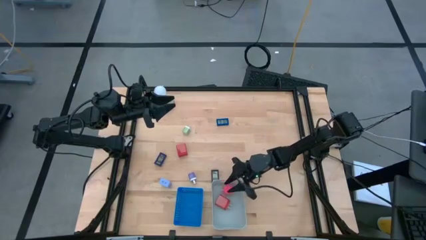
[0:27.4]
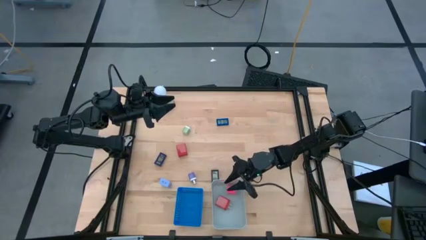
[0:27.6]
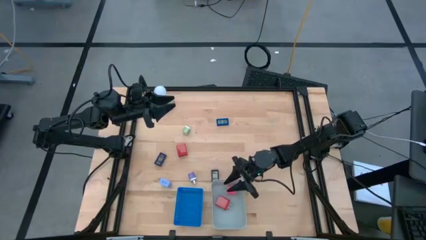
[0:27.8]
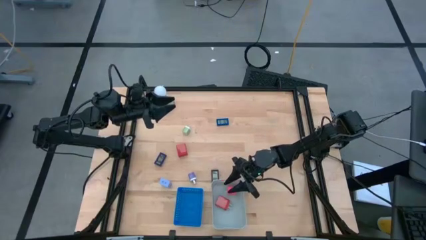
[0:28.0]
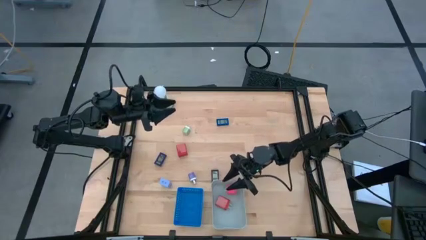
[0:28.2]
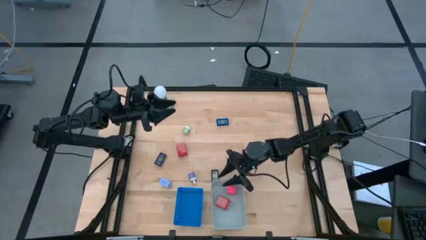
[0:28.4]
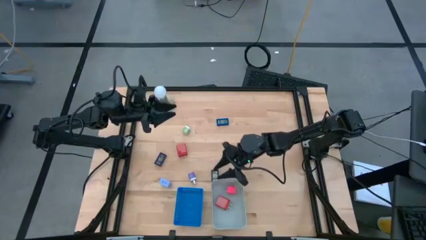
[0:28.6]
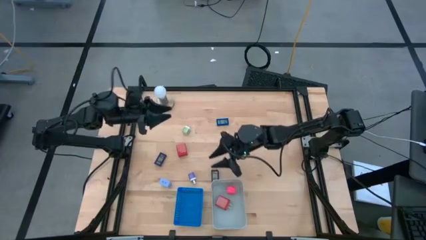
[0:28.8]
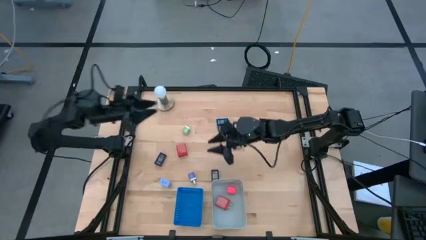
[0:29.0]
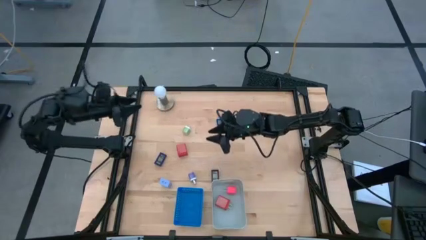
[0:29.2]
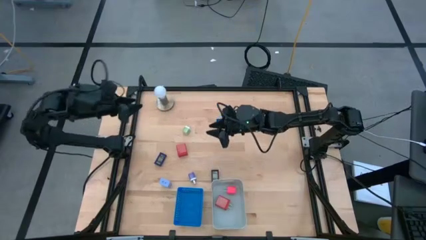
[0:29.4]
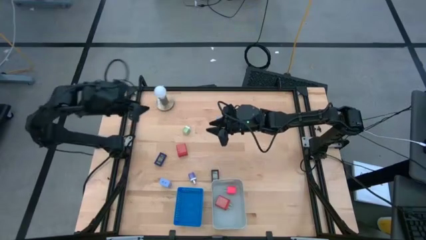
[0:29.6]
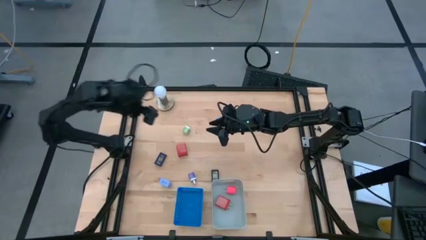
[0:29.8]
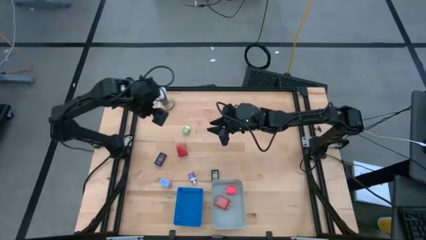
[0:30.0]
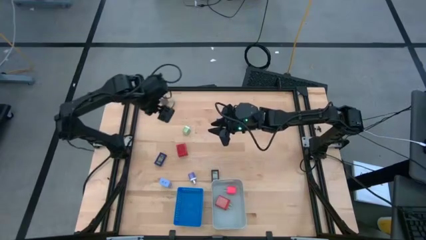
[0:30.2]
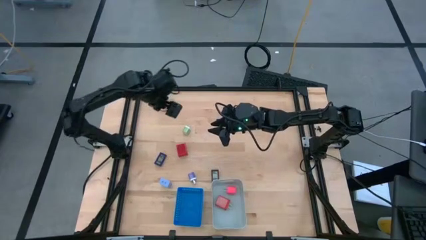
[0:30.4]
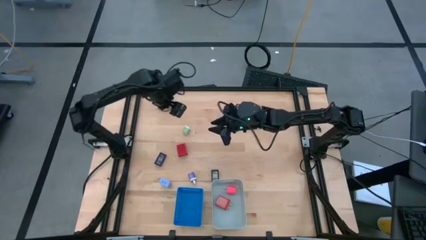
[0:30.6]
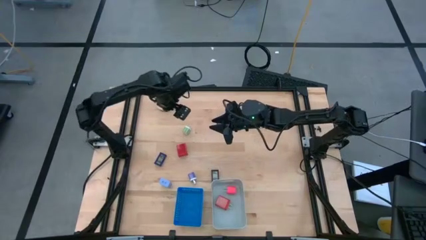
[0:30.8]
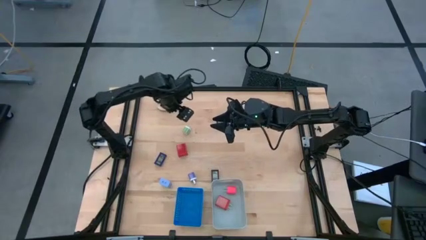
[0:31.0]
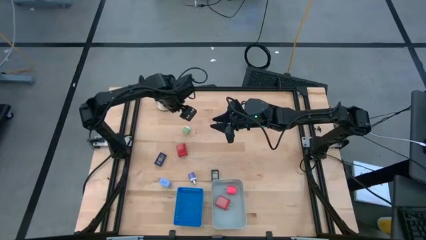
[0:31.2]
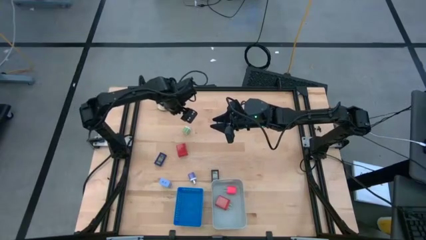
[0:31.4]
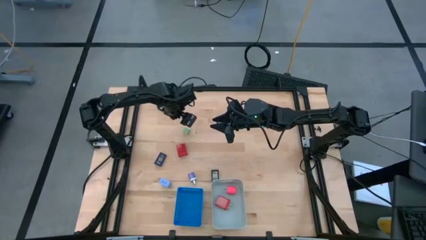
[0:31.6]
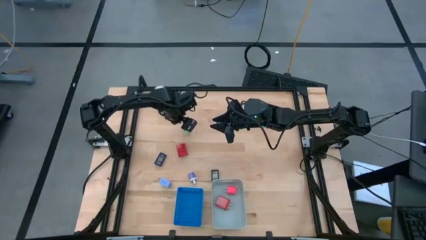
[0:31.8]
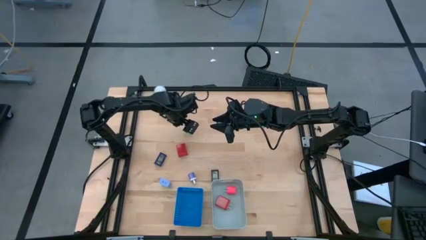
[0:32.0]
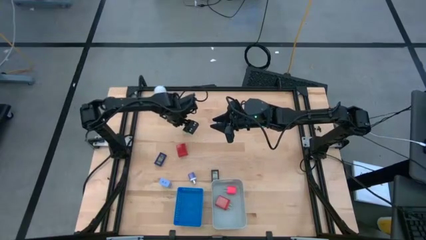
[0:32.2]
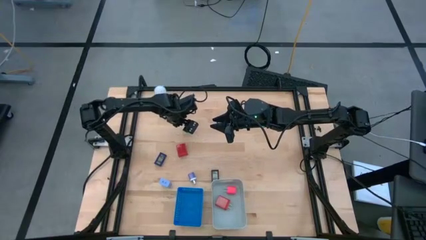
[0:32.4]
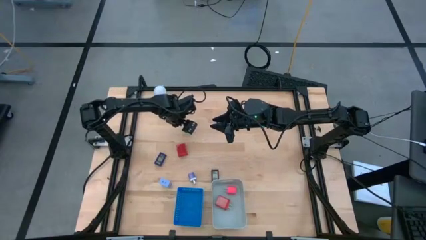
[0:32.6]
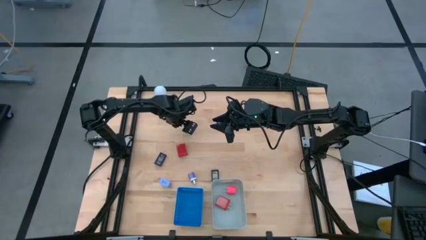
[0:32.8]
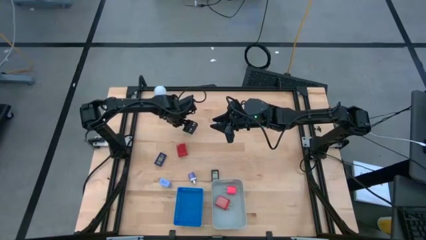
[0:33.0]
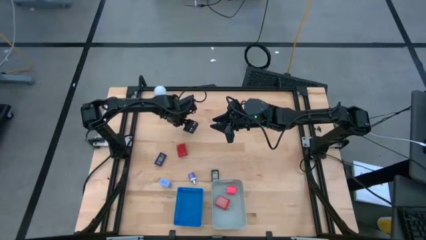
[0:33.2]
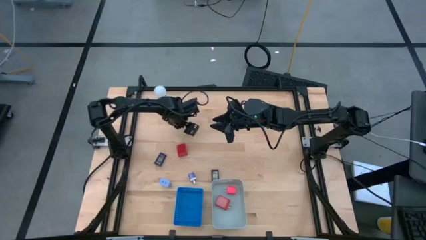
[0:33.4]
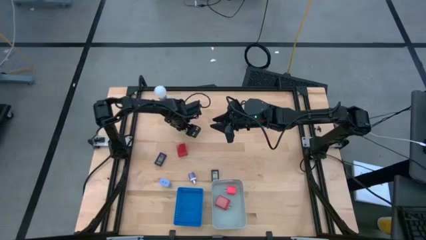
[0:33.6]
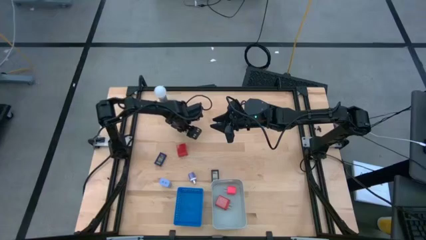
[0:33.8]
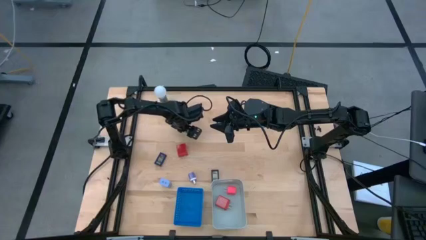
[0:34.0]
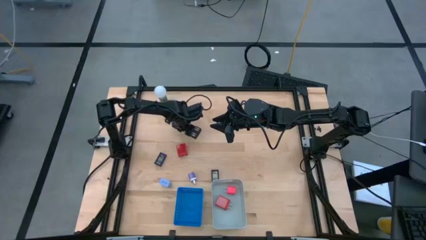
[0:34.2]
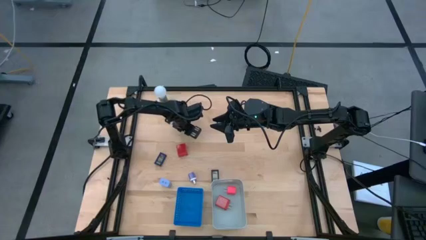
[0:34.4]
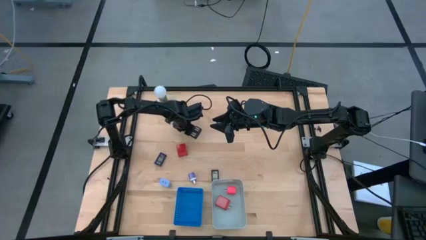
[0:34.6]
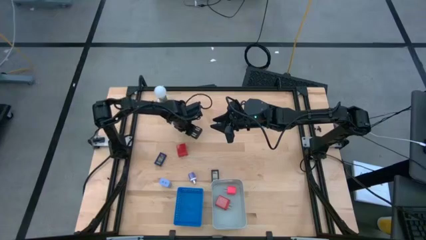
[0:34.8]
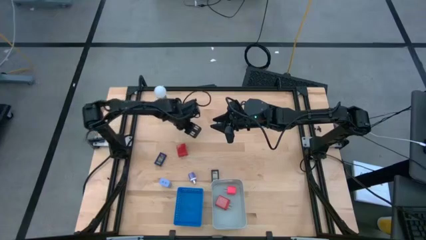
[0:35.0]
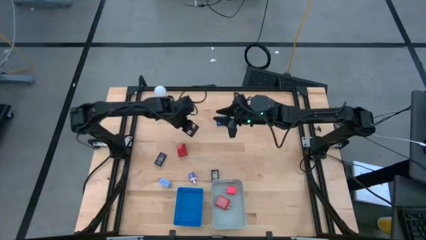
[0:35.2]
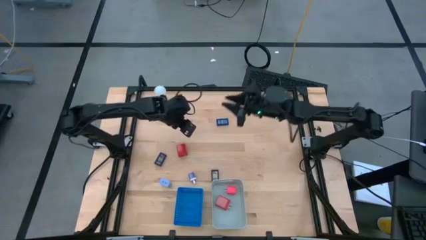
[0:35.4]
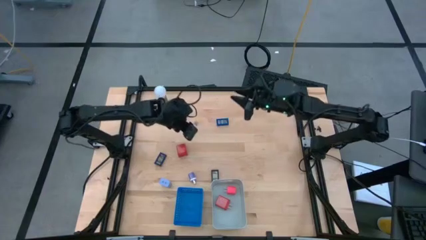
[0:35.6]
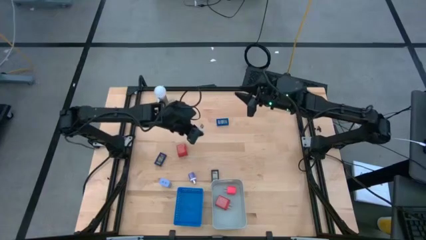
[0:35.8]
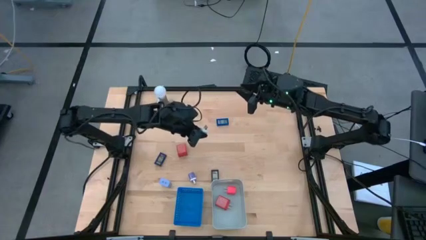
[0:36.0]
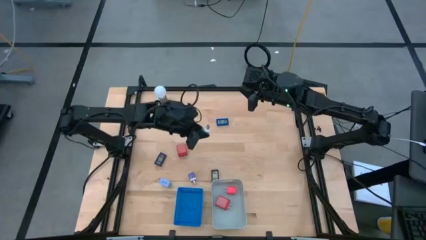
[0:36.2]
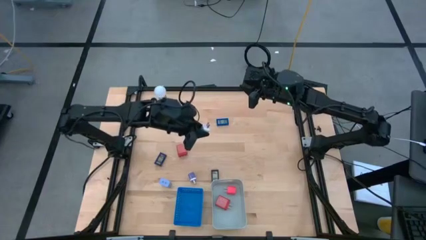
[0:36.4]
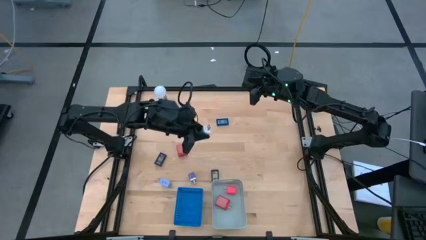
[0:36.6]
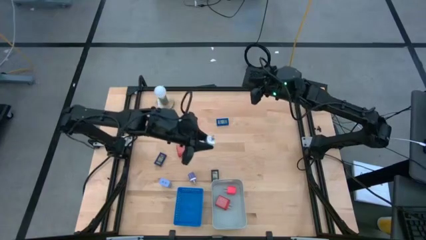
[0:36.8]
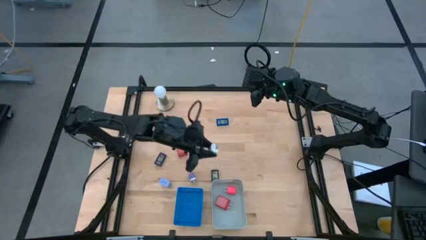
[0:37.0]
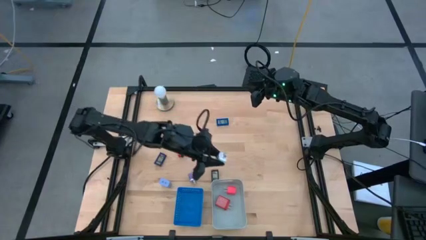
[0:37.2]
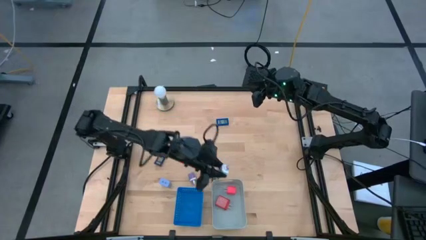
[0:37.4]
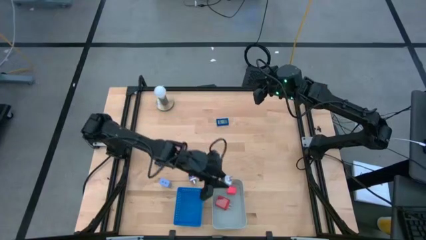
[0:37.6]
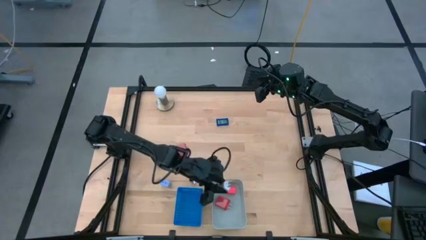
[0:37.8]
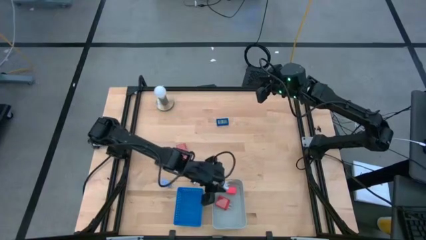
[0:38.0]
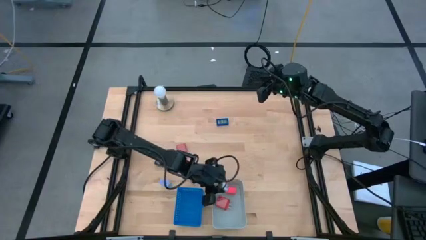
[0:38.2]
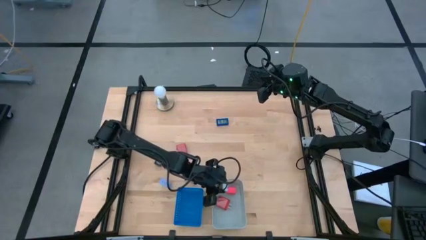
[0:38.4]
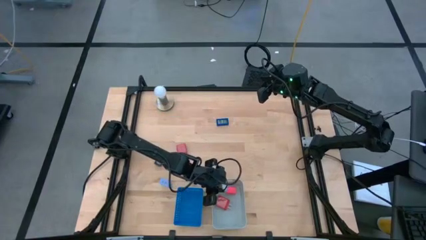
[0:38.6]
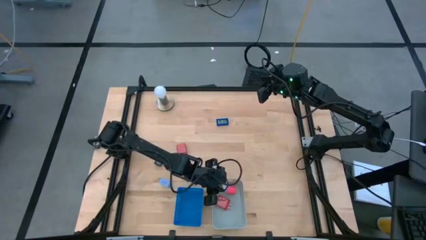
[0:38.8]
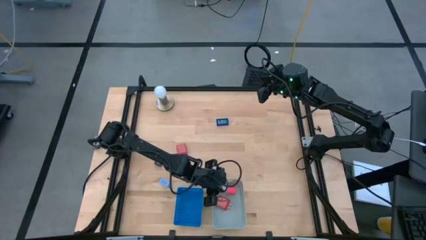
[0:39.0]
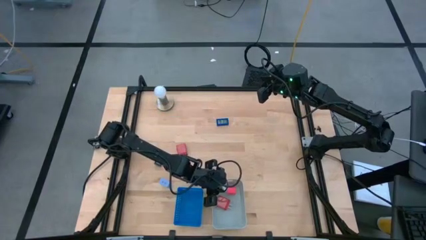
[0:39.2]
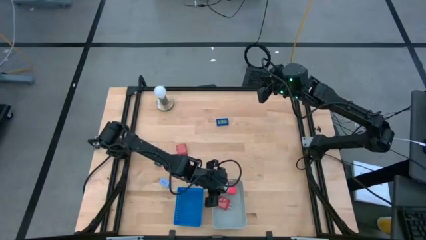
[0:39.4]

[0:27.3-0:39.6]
Task: Pick & Place Office items
Put the green charger adapter into the gray bin
